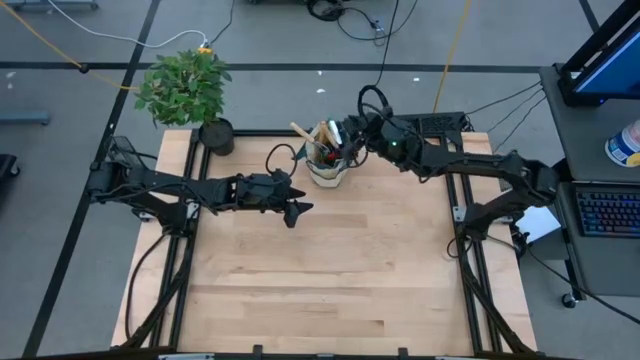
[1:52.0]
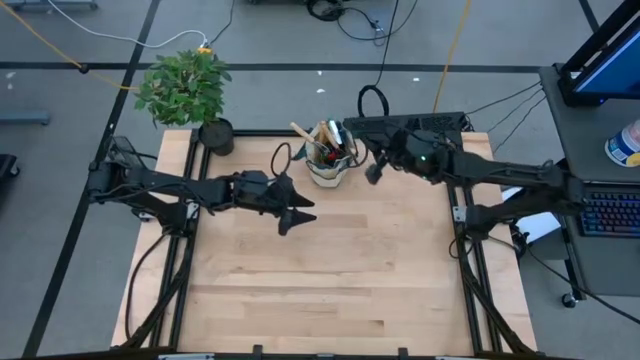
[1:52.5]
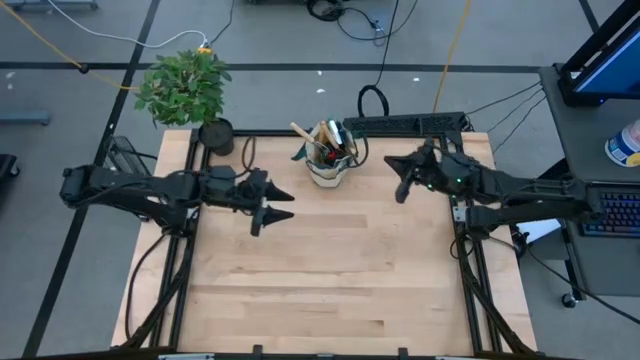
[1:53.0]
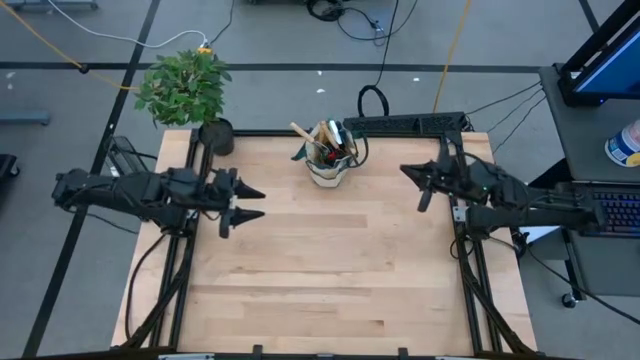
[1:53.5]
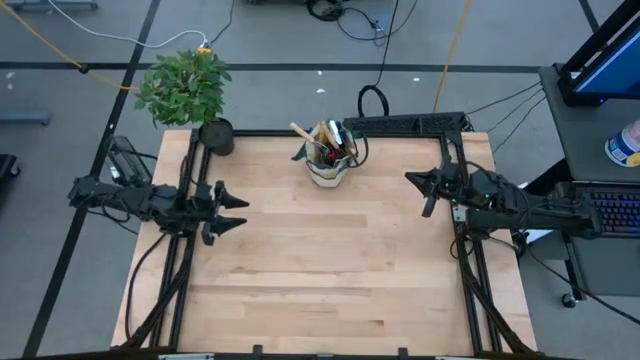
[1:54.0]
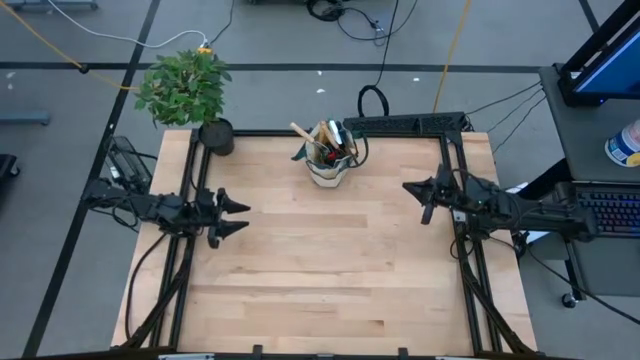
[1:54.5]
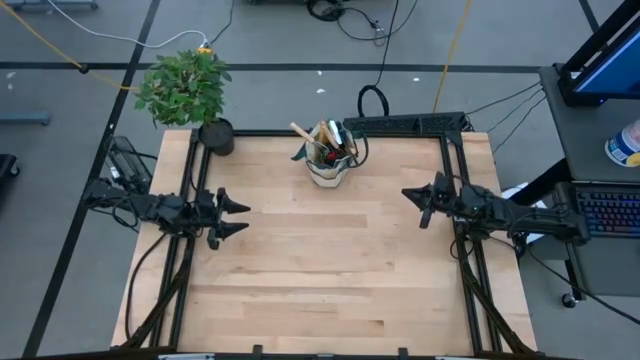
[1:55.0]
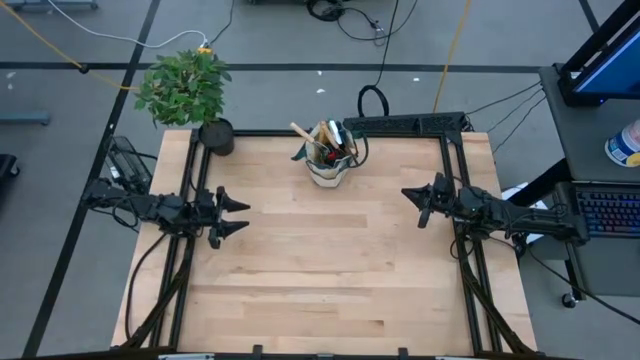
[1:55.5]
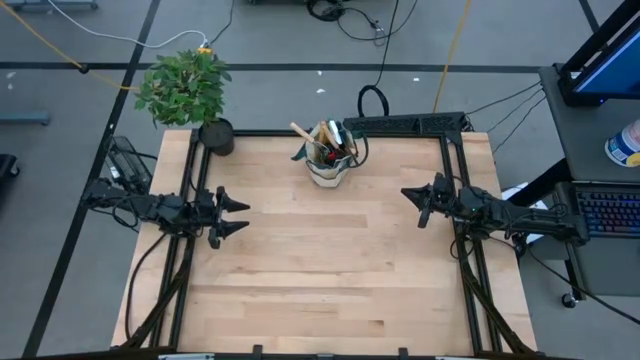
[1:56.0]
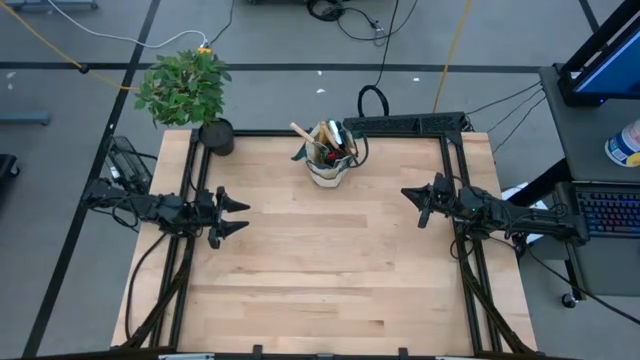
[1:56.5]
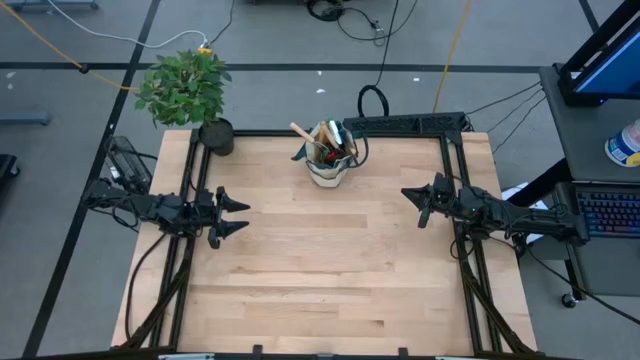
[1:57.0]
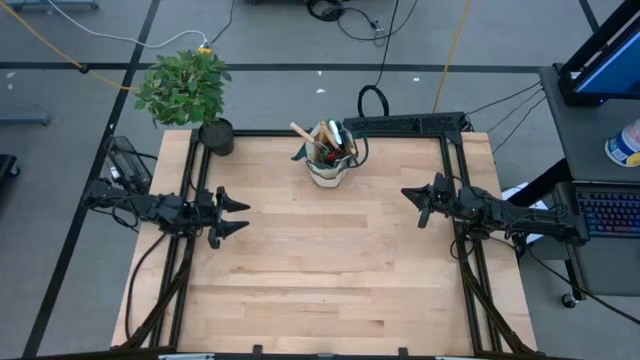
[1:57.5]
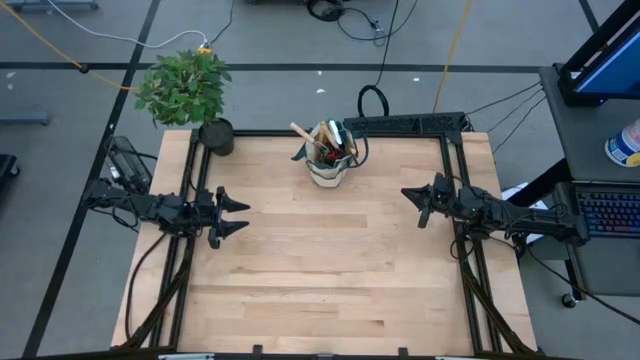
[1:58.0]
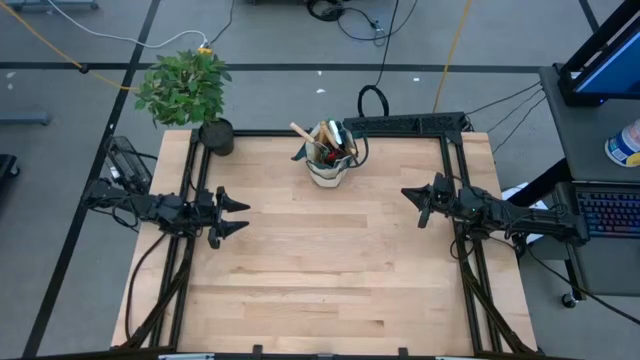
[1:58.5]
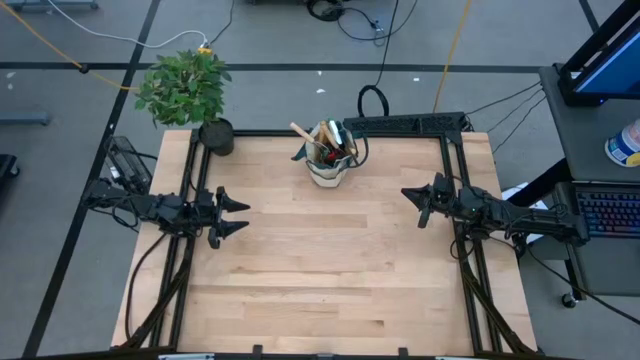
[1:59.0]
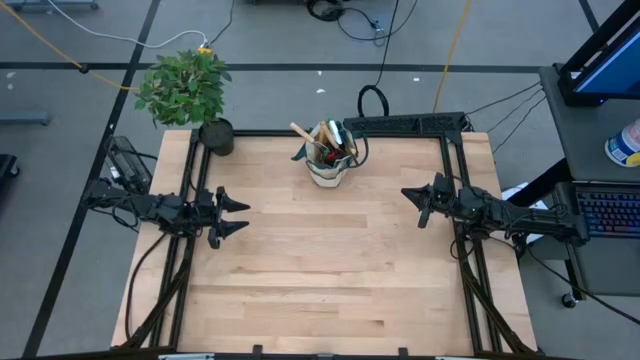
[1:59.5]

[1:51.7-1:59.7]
Task: Pick & Place Garden tools in Gardening bag
Return to Home Position
